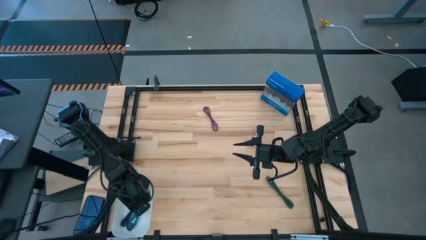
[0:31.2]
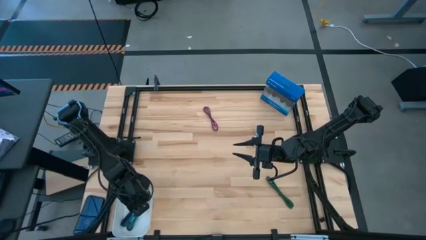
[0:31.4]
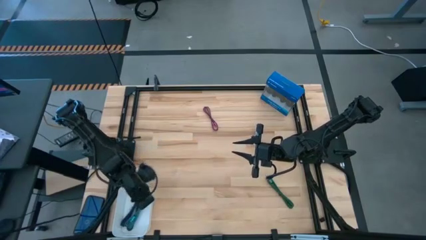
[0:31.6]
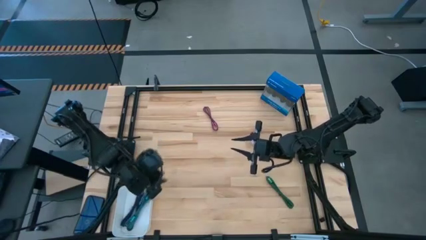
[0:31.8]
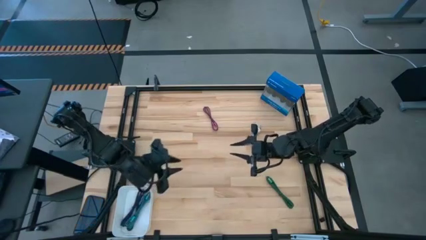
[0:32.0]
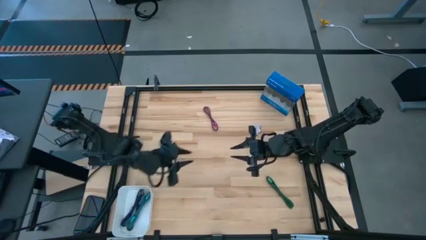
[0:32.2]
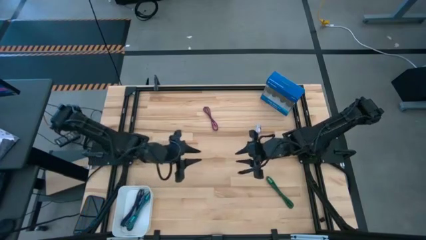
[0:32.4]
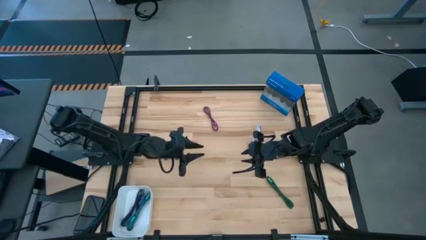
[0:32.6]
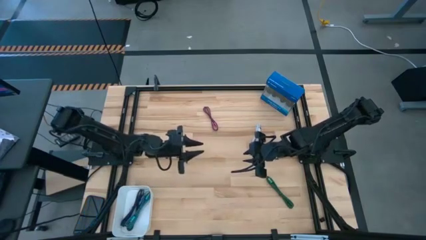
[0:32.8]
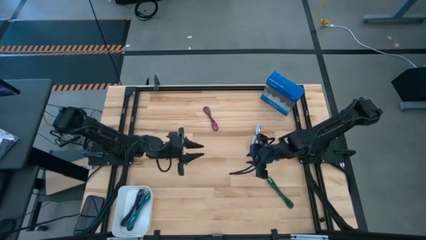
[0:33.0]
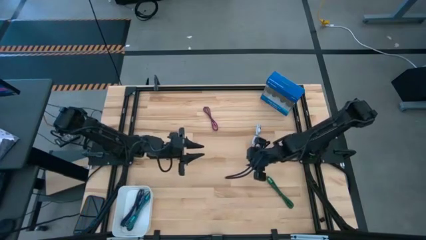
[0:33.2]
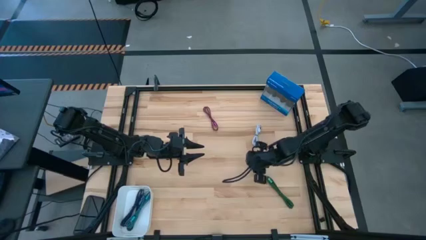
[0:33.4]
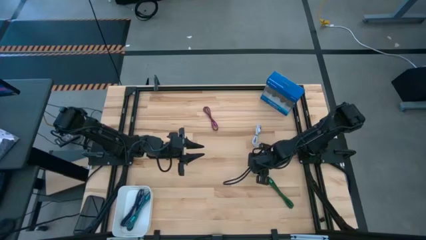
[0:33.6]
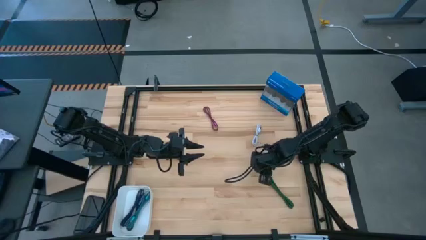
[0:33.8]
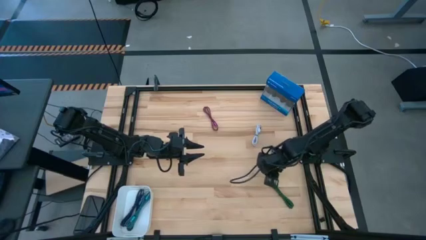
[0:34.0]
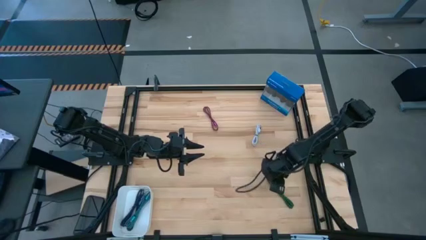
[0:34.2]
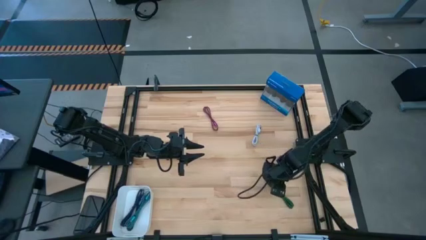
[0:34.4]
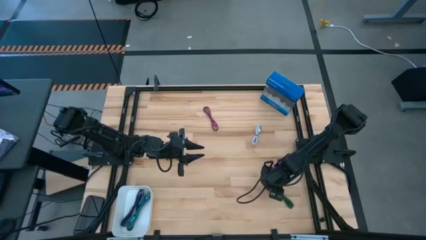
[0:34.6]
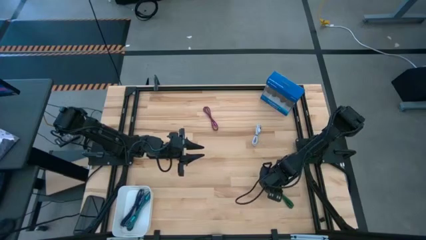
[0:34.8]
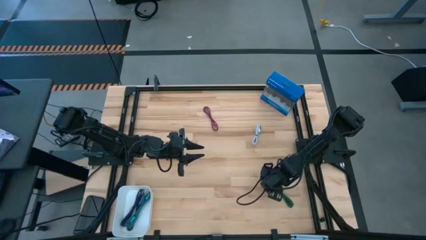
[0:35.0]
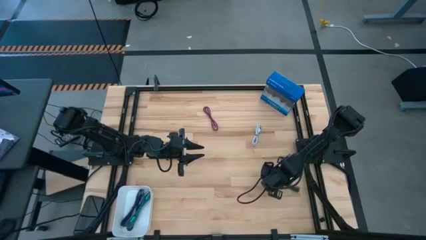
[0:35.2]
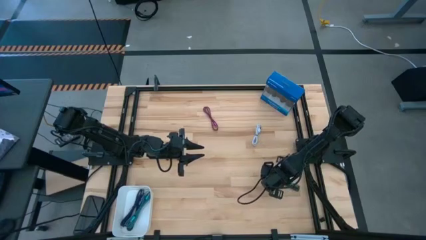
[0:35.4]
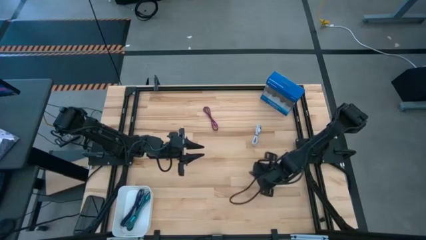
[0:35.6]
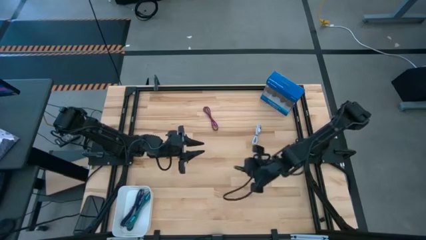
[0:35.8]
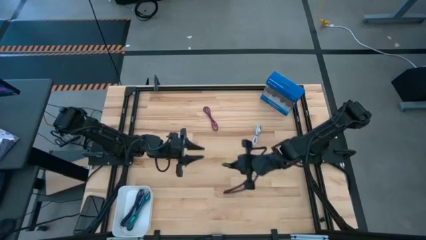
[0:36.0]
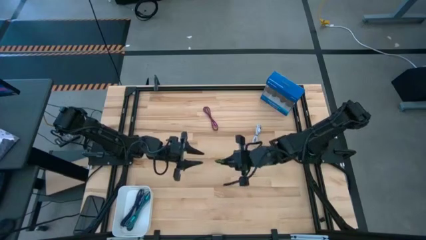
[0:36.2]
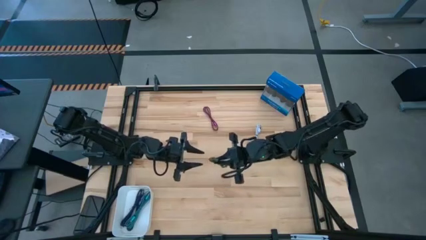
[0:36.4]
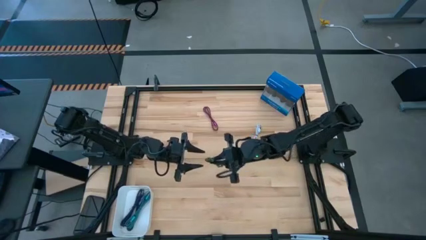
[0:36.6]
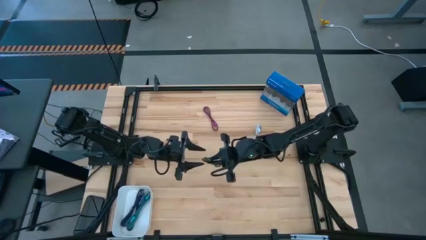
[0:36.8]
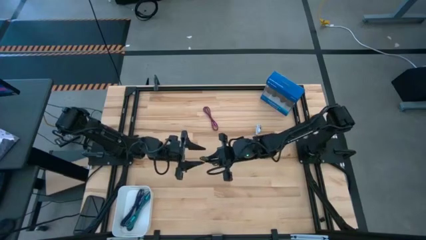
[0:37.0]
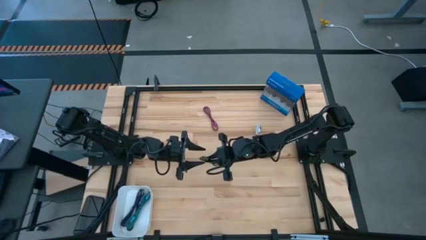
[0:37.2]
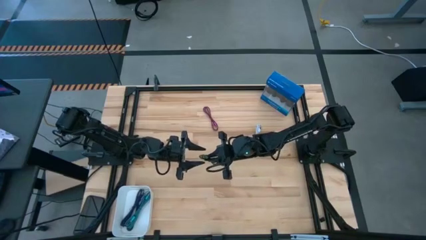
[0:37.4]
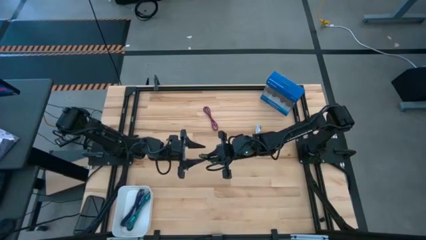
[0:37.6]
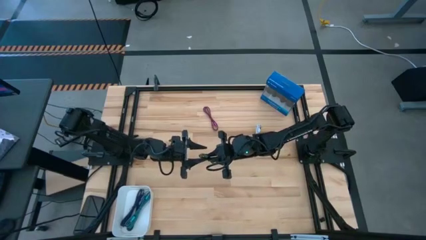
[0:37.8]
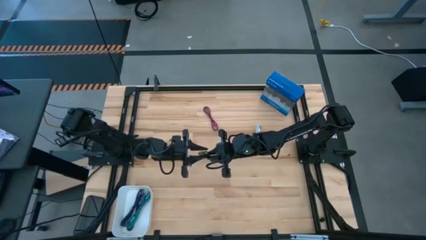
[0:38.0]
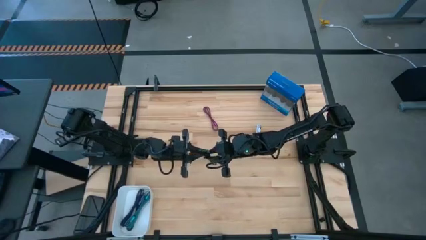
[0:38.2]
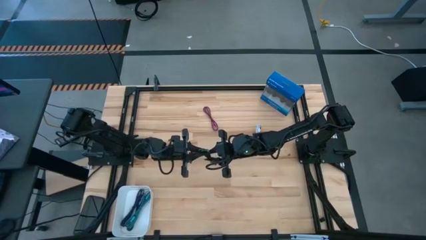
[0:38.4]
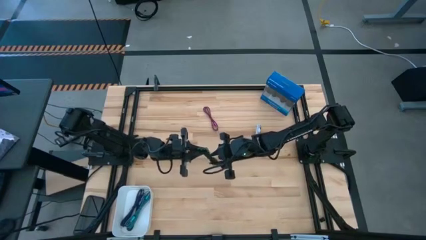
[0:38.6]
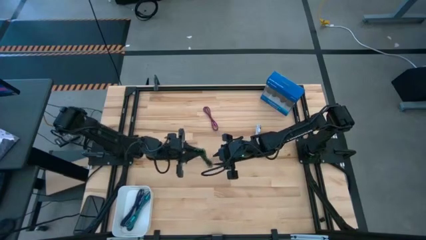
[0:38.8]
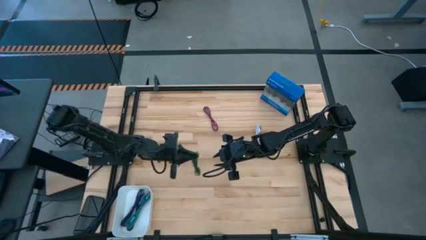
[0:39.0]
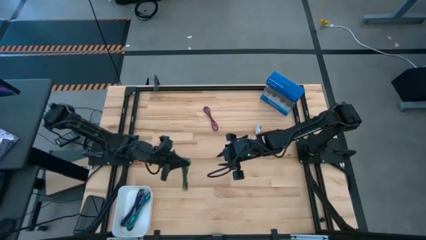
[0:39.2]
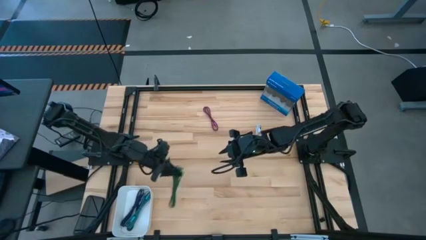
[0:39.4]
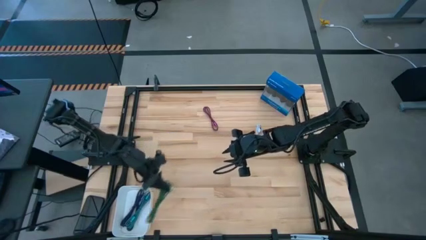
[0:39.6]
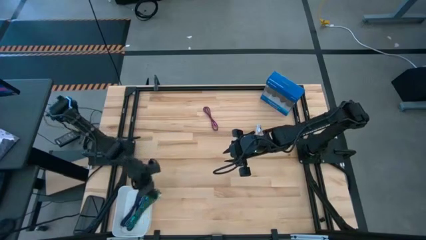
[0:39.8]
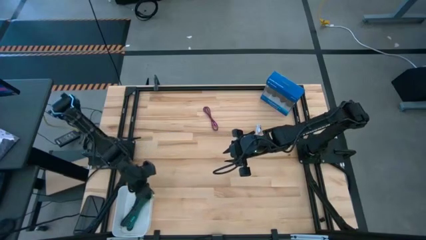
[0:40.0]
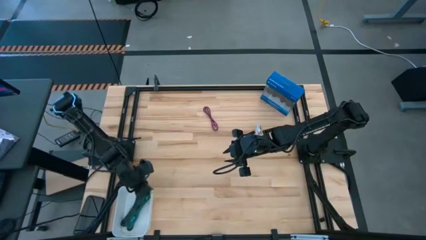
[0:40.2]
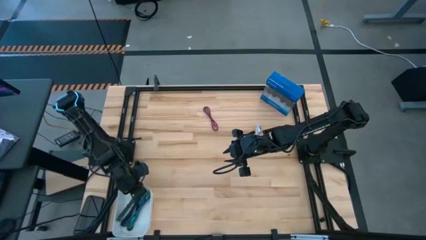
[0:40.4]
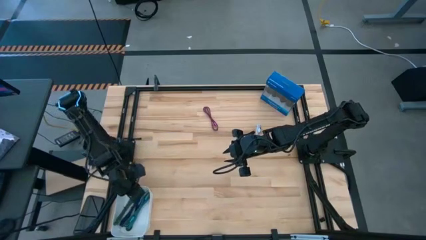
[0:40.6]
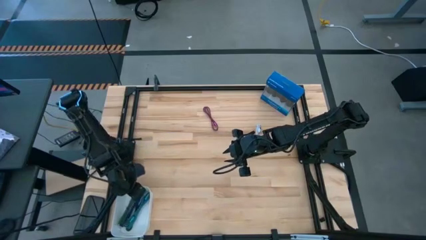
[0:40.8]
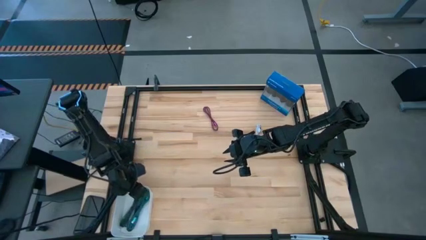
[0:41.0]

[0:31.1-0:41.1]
Task: Pick and place USB-C Cables
Put the green charger cable into the white bin

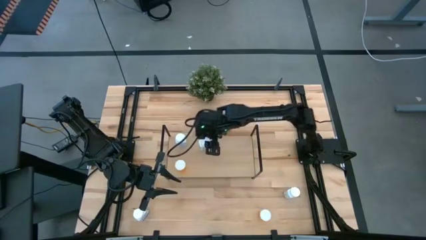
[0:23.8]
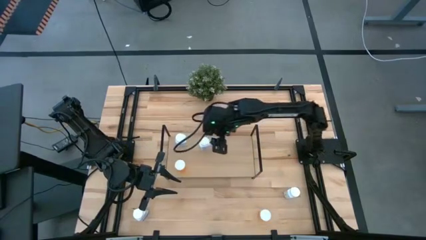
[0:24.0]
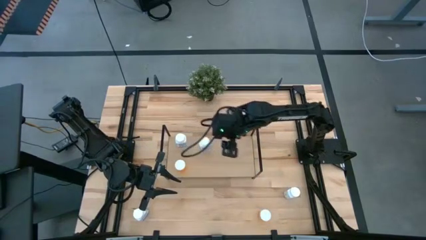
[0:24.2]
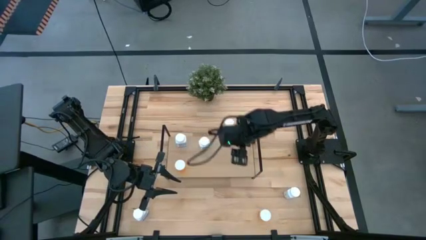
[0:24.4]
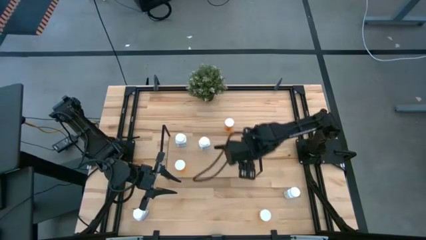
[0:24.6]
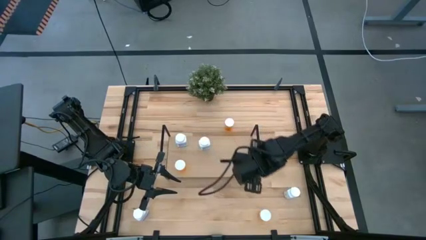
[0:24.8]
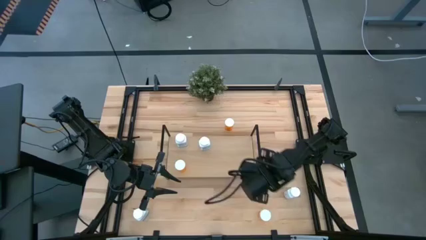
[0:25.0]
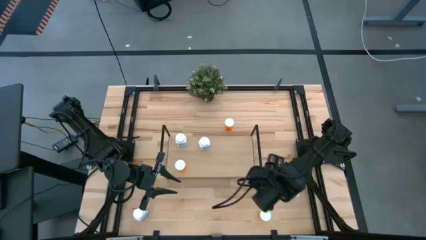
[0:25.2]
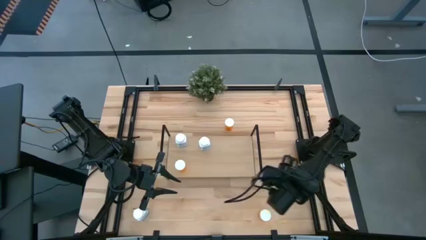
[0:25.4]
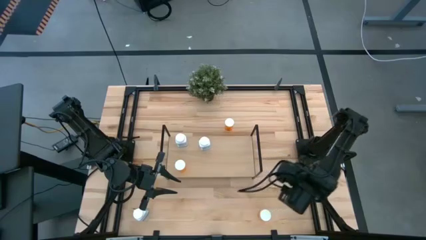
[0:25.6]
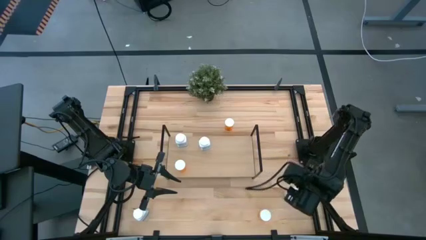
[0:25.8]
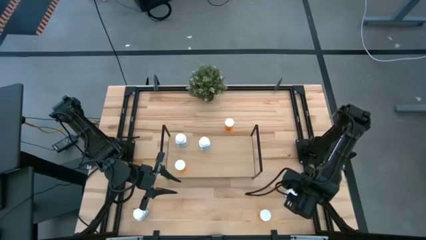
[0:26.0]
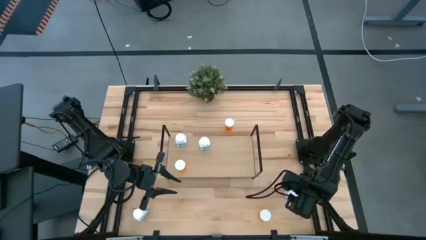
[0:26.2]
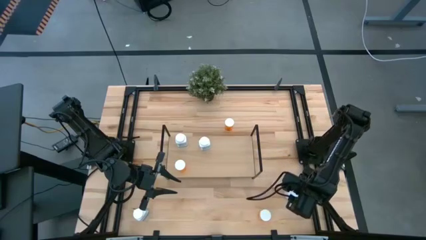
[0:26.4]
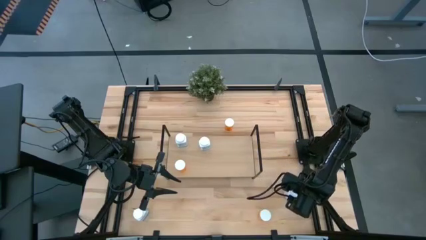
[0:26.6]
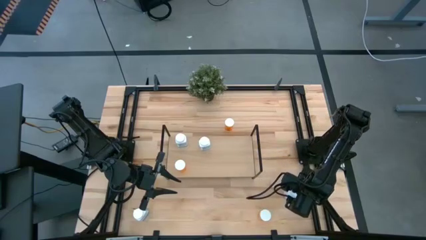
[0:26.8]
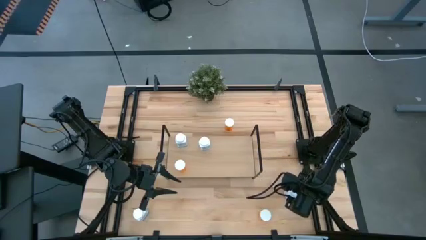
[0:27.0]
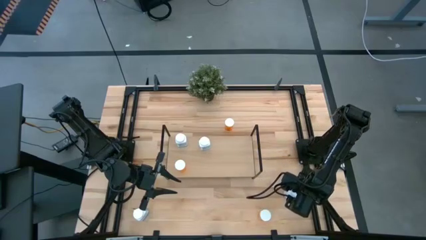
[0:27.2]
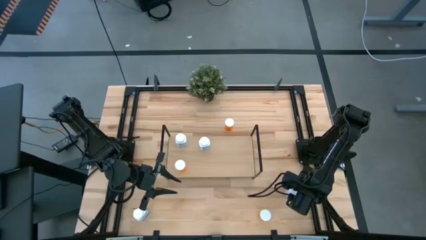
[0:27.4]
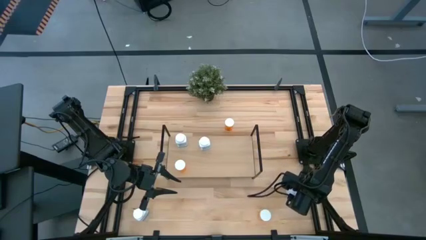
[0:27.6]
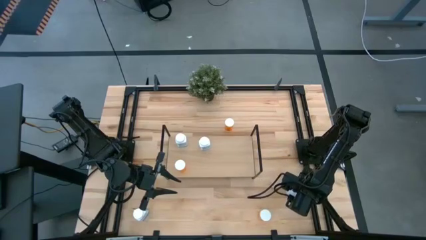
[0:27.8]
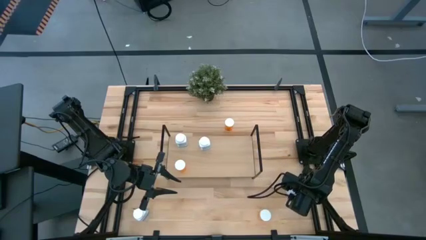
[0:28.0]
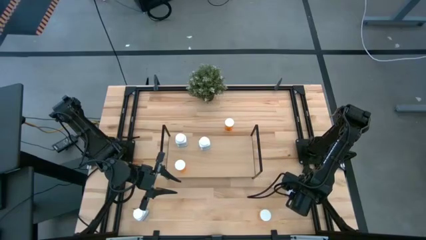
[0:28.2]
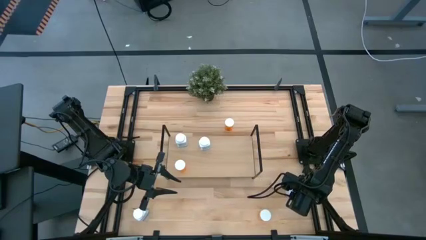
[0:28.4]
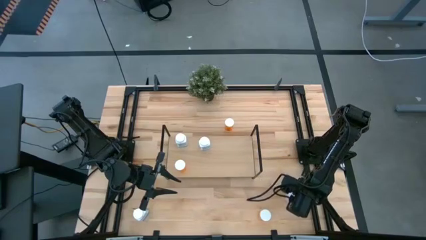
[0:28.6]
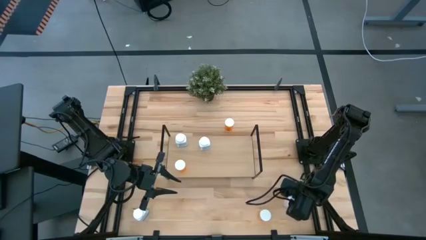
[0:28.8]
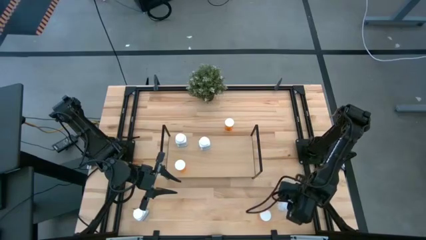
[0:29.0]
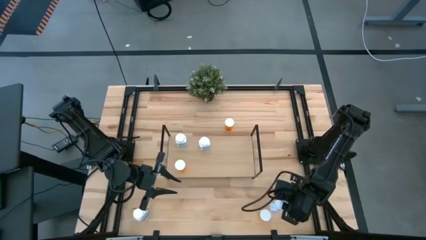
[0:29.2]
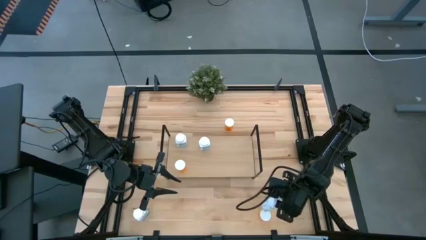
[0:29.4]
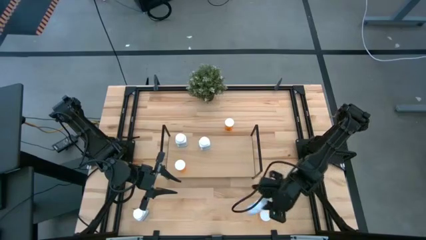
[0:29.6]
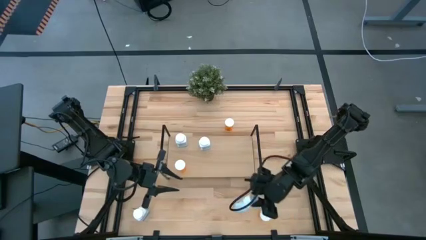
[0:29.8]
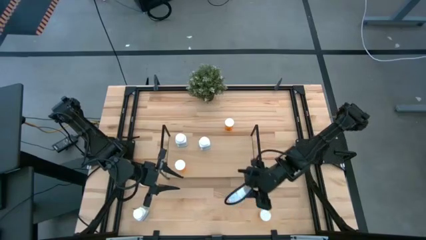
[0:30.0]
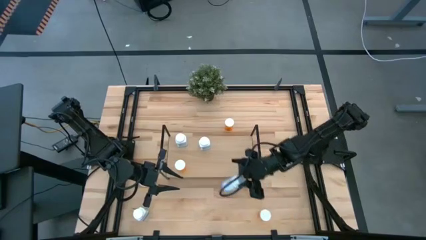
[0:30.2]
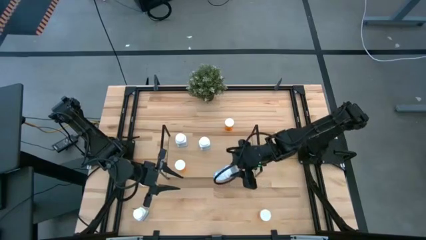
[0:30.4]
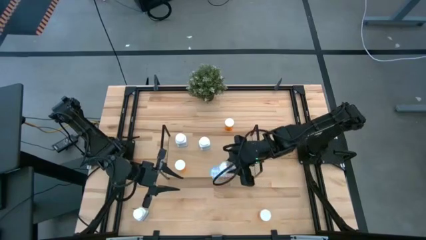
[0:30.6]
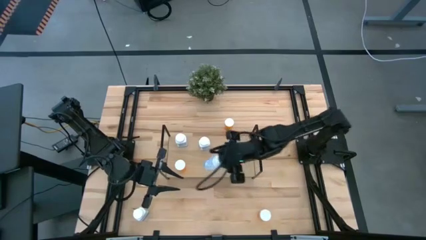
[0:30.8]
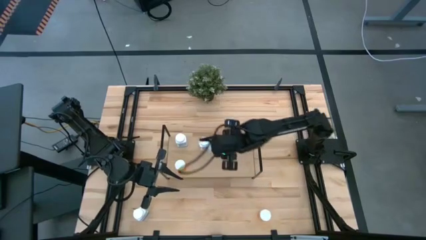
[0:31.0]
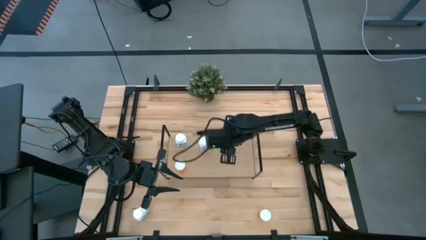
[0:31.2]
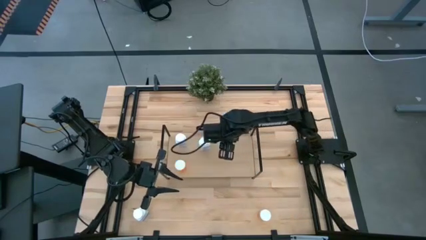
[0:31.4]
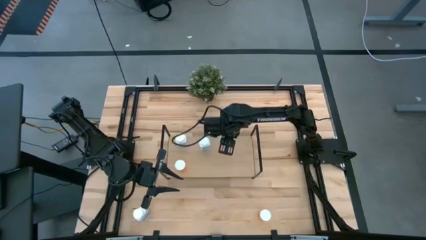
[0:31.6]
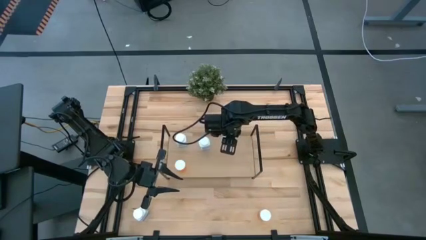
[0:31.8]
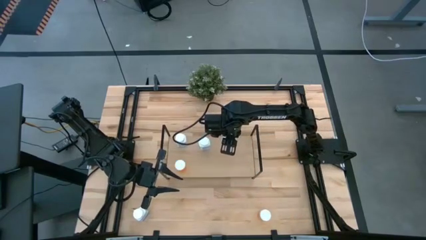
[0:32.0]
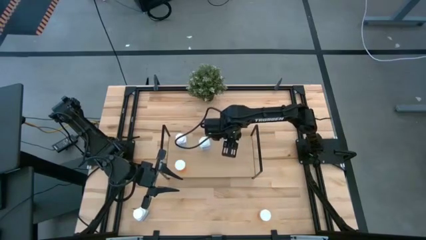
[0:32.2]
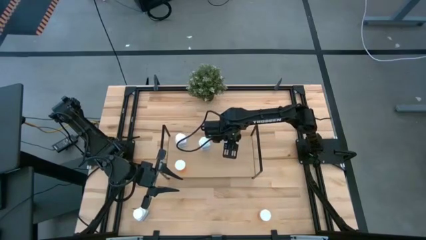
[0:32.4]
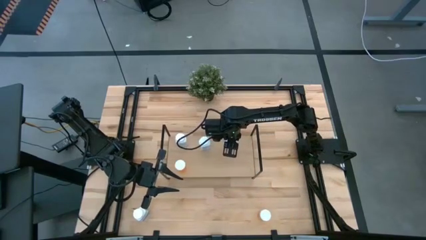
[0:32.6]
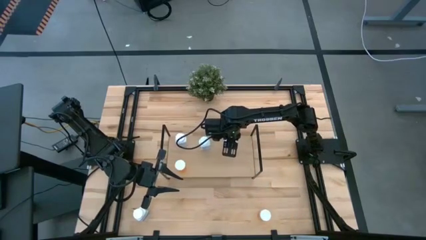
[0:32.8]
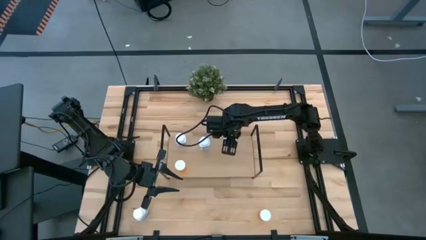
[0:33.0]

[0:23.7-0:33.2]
Task: Pick and place medicine bottles onto shelf by color
Put the right white pill bottle on the shelf
